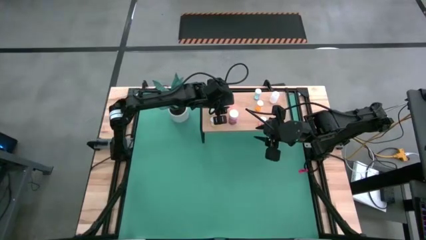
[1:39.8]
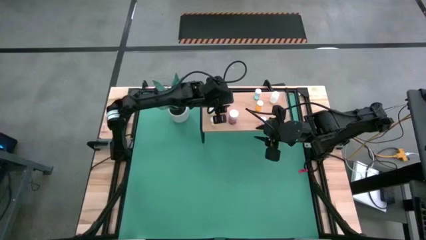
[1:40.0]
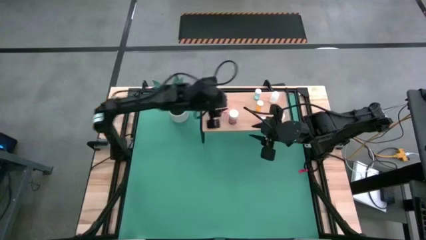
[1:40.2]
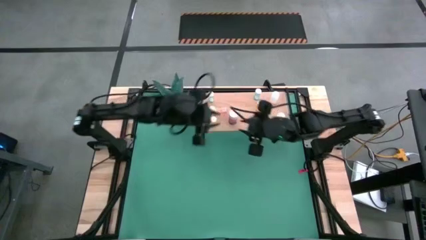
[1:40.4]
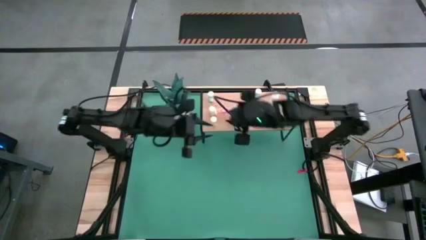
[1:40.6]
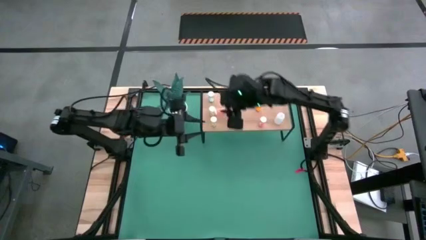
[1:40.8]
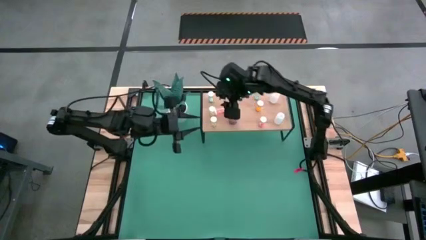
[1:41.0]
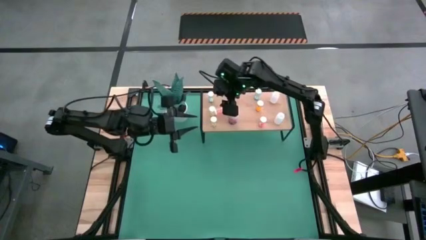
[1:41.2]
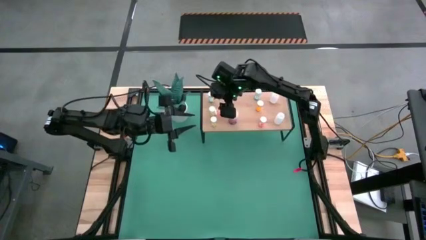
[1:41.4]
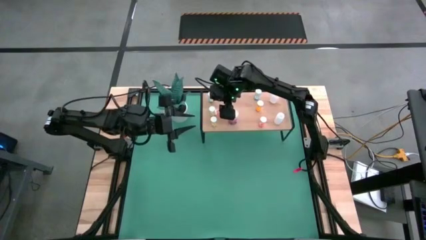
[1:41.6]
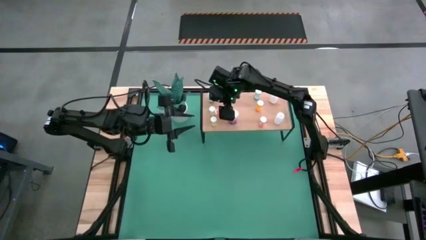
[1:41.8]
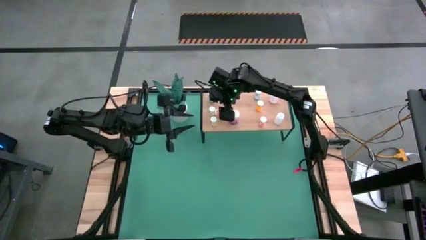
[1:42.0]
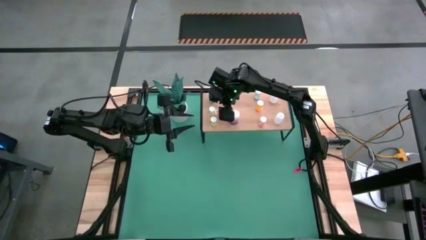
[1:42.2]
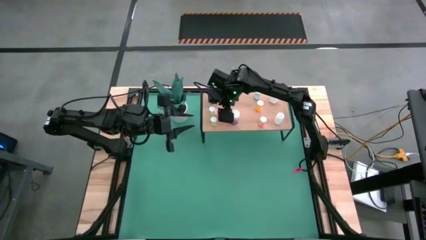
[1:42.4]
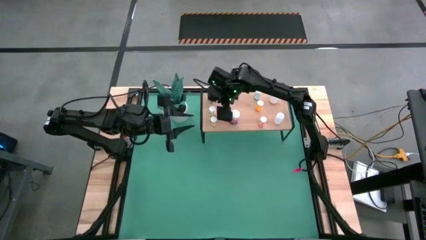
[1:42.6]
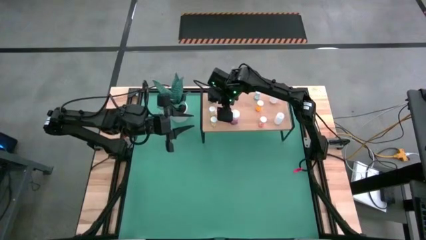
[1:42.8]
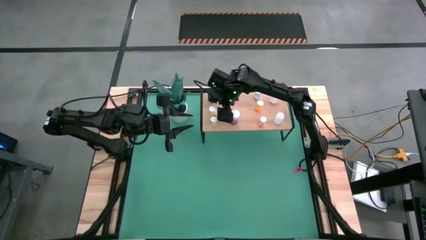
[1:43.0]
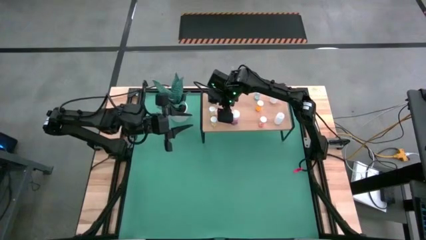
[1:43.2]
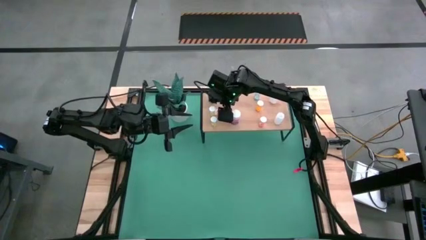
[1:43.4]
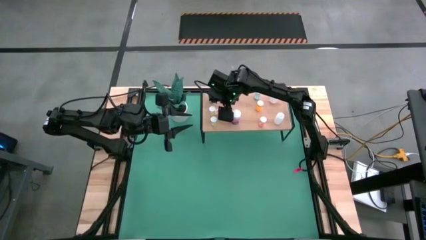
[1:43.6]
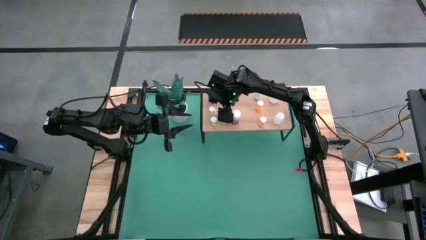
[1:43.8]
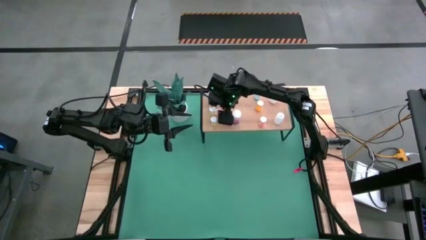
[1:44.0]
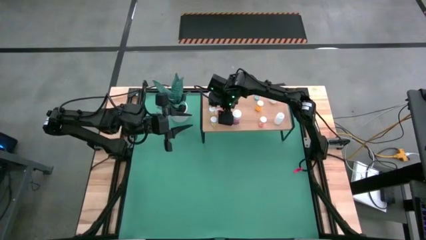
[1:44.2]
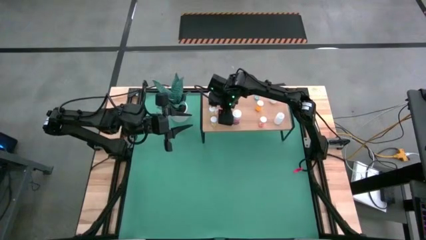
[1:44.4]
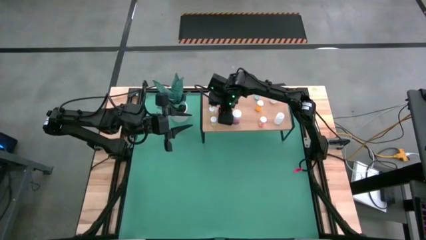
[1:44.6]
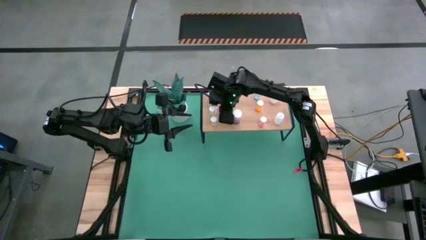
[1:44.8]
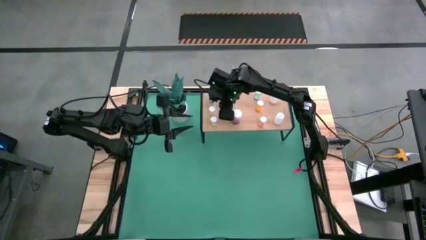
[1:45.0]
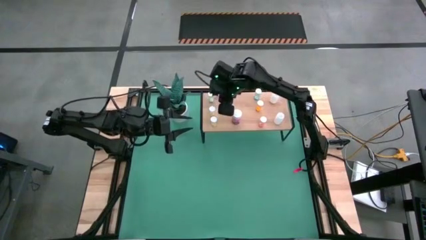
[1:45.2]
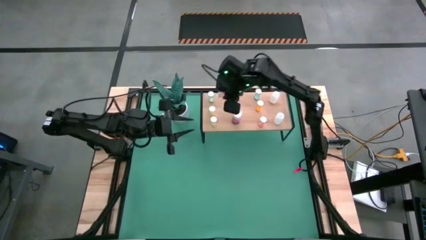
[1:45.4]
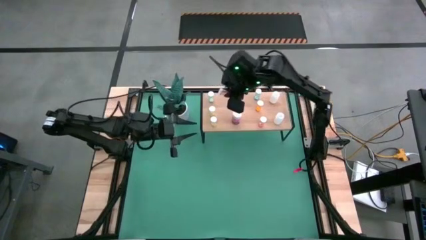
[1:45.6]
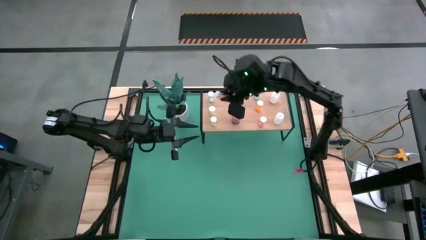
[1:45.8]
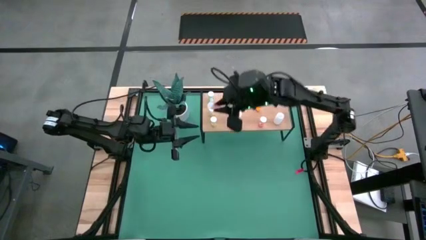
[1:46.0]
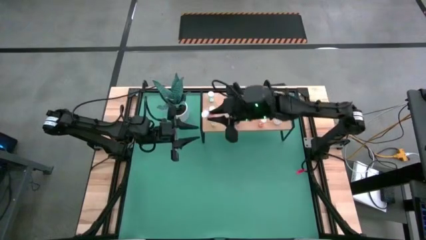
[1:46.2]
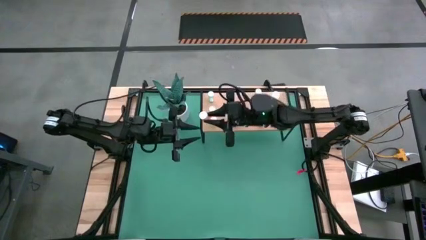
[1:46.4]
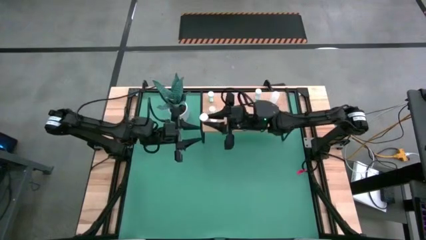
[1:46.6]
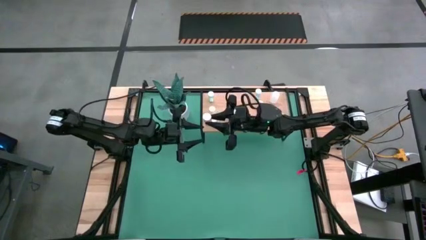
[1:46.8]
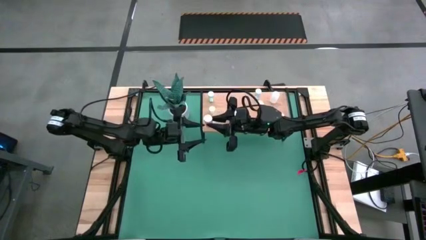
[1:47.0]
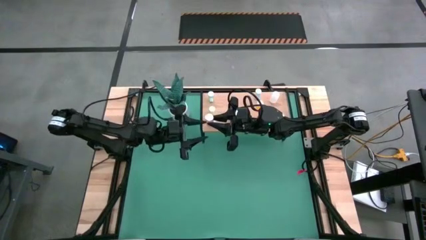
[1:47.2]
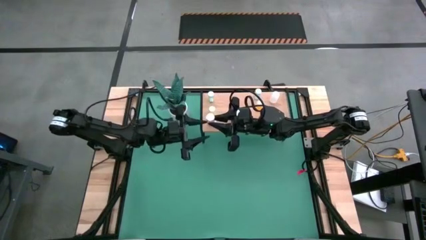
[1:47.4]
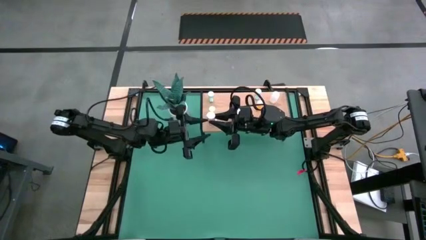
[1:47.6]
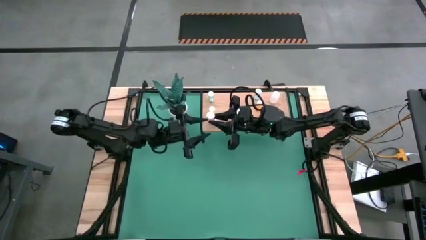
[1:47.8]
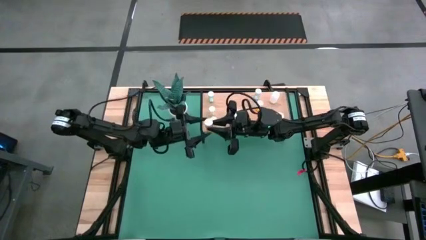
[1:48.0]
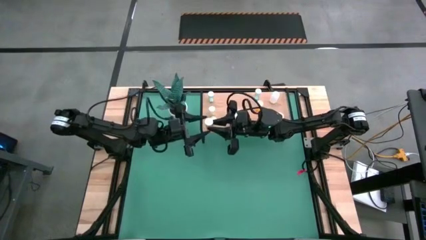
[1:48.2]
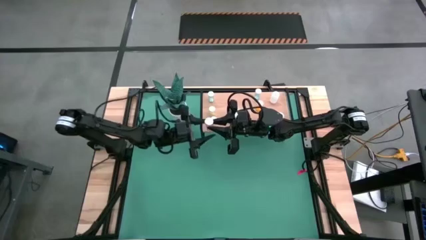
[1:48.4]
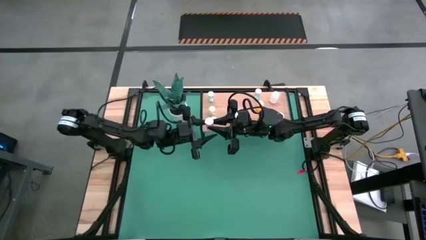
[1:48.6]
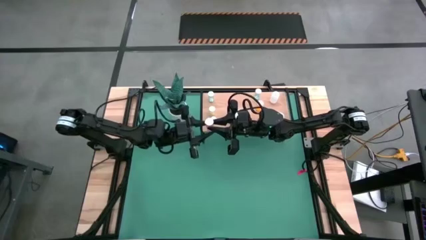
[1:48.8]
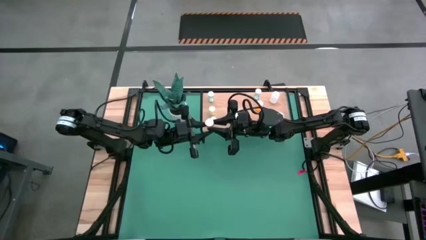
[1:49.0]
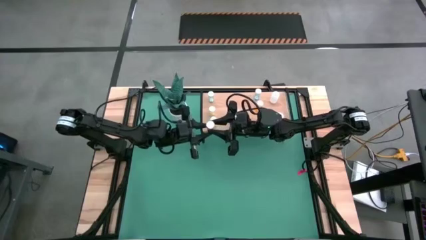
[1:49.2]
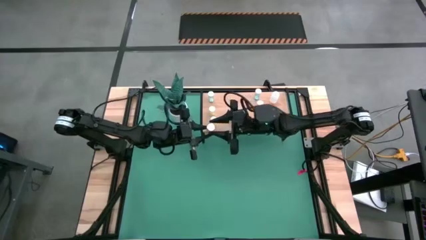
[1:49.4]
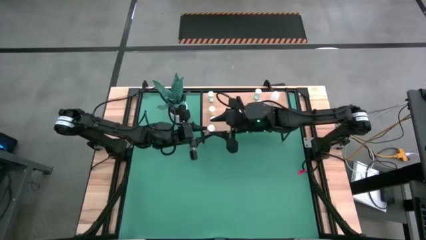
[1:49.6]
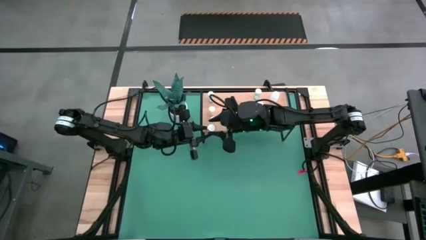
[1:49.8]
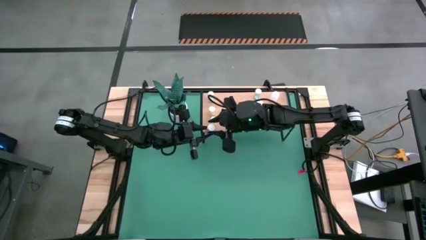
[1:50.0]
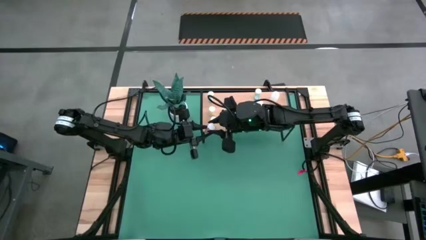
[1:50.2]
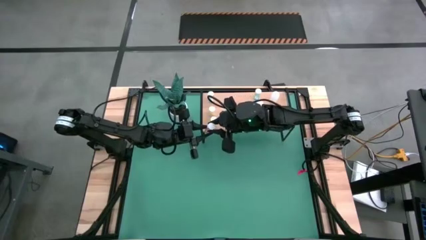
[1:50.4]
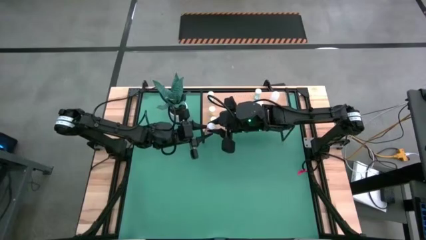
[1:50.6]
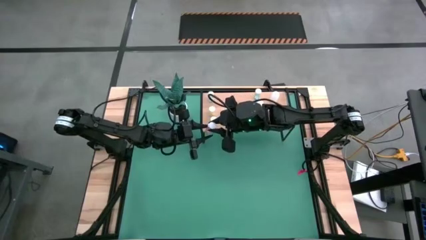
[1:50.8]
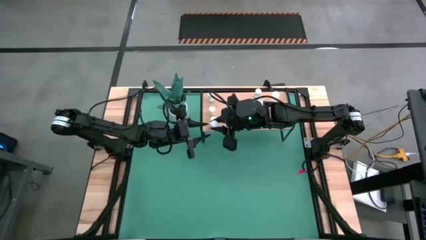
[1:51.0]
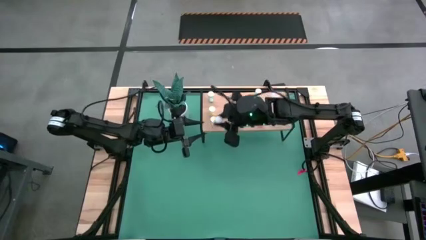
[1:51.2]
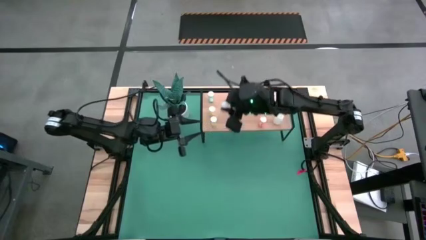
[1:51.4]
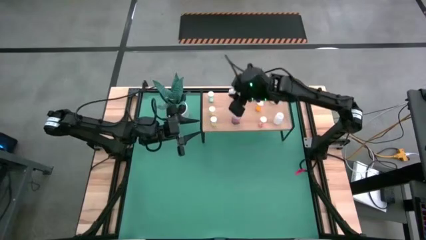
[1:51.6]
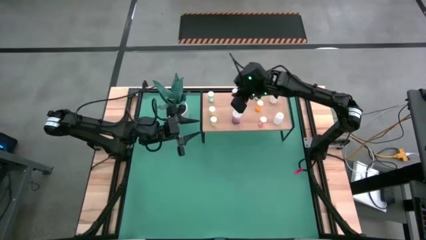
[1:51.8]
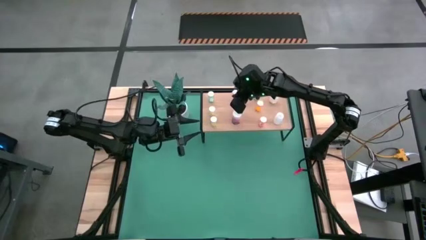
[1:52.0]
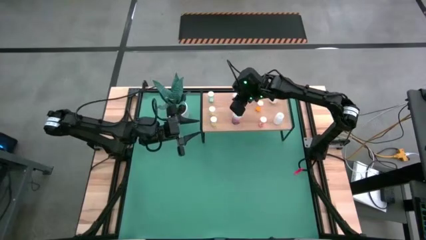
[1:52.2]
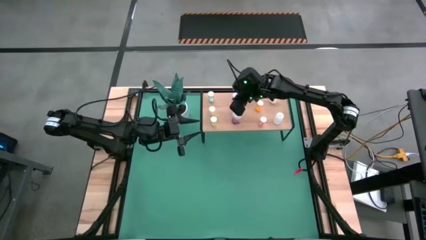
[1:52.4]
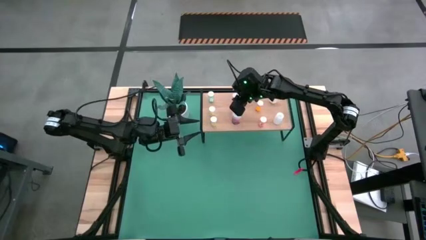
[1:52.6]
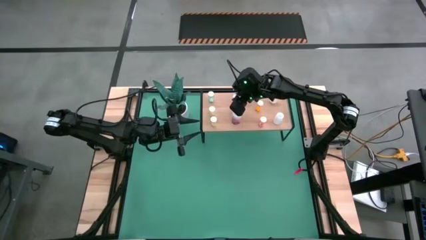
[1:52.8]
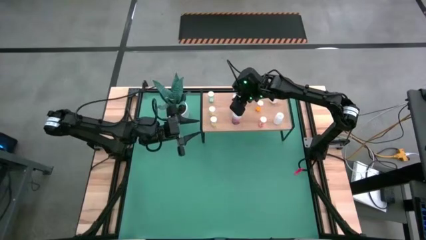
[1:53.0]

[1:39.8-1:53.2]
Task: Pick and place medicine bottles onto shelf by color
Put the light pink pill bottle on the shelf

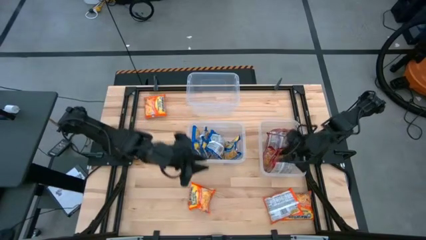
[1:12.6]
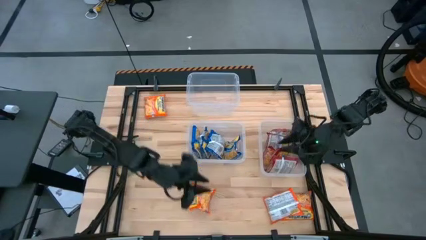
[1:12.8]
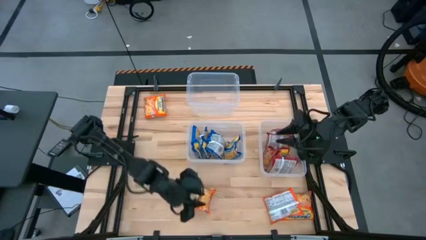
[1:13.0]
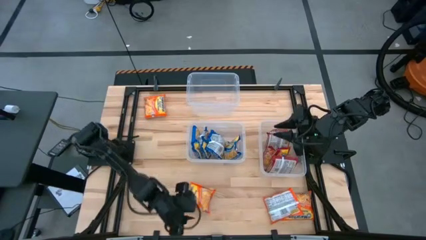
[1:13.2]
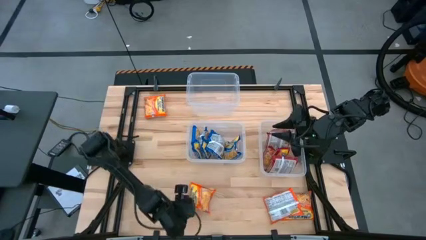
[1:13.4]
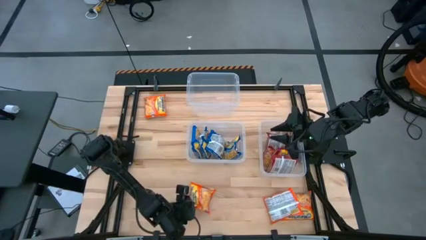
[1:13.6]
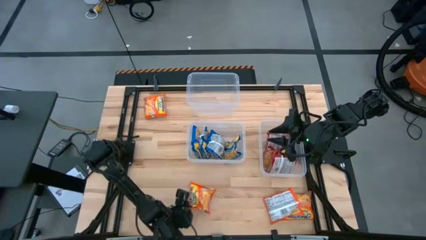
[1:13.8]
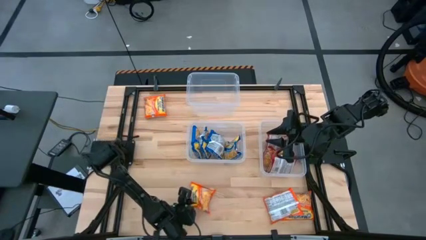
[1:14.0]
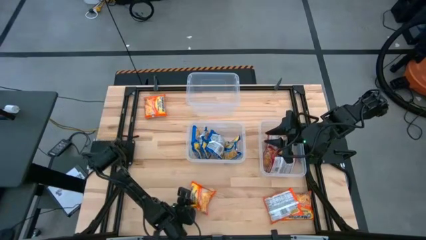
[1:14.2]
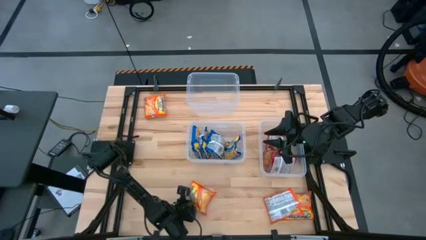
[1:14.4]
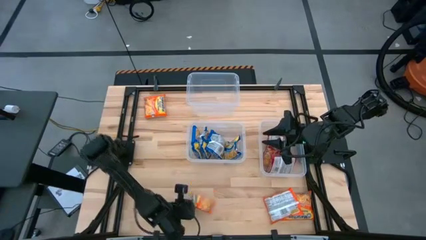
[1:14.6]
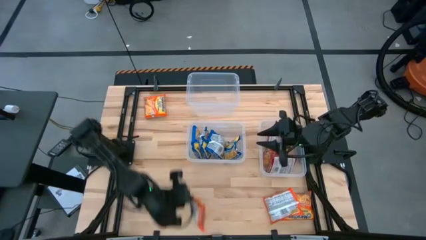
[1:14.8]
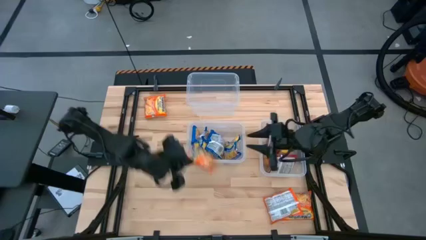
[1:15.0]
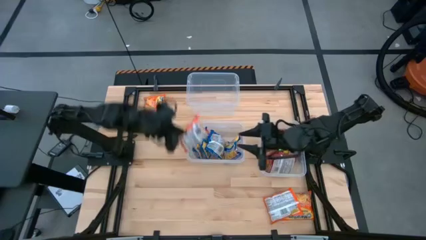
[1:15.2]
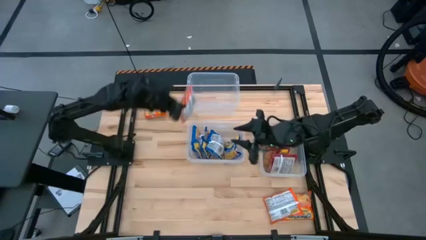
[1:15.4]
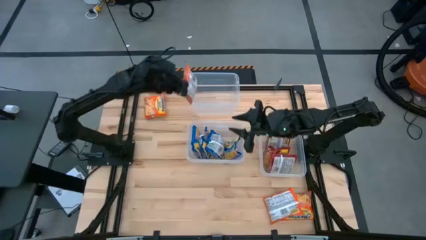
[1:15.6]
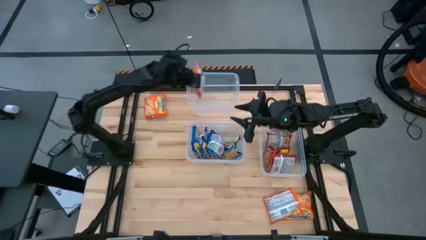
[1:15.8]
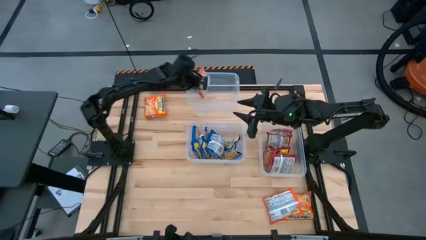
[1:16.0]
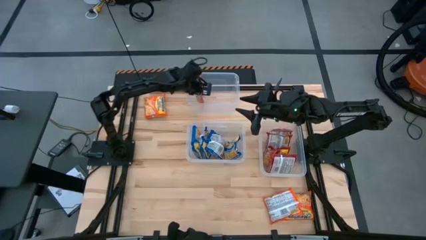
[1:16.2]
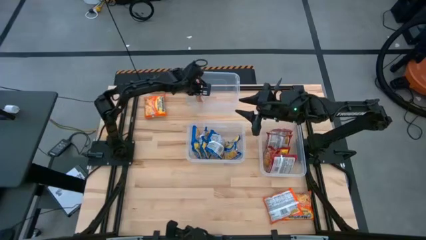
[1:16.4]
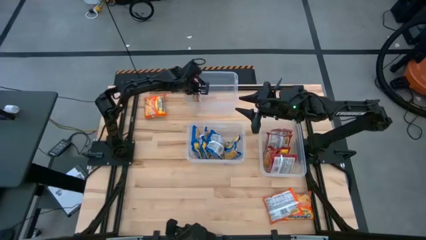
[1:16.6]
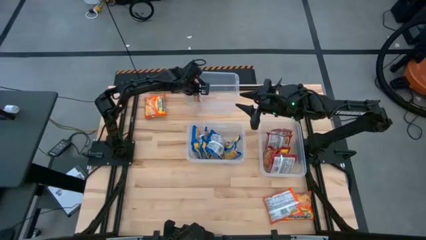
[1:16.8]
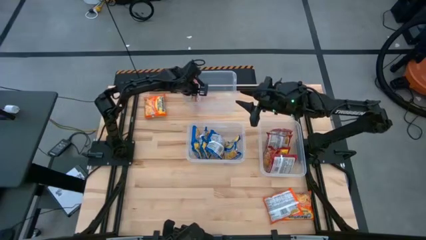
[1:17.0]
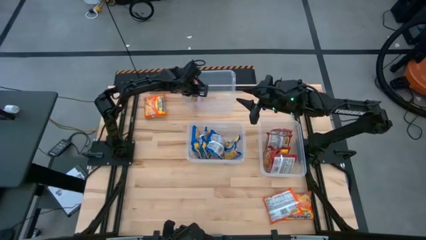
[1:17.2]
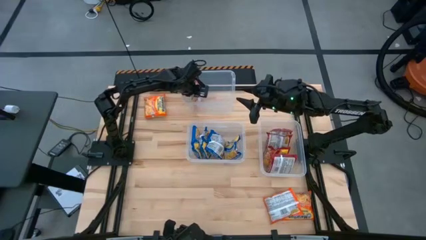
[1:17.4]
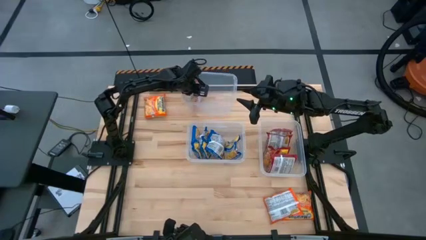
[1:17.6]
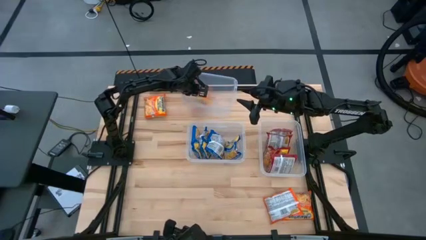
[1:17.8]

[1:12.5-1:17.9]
Task: Sort Maruchan noodles
Put the orange noodle pack into the top transparent bin
